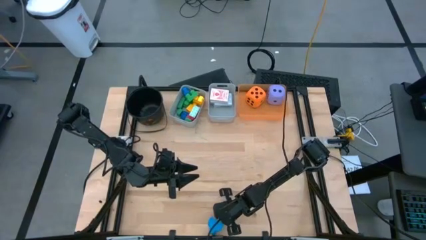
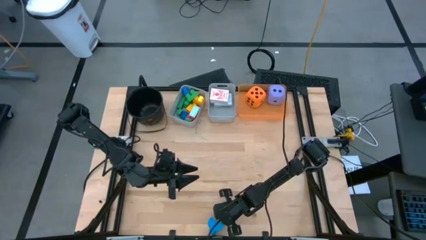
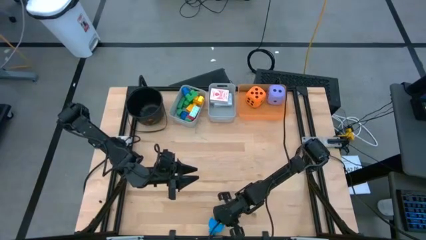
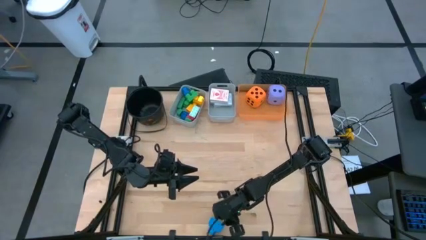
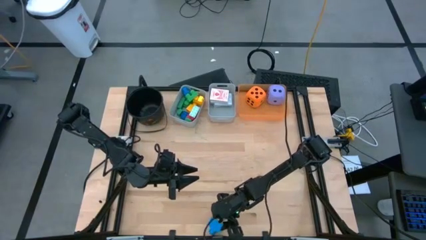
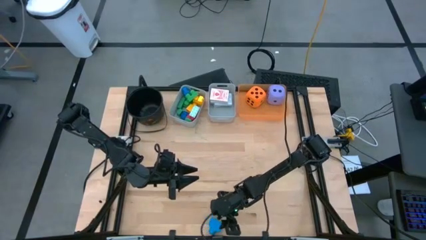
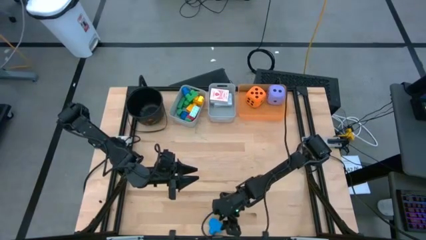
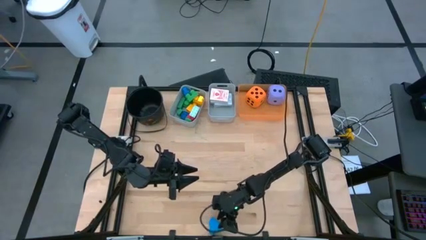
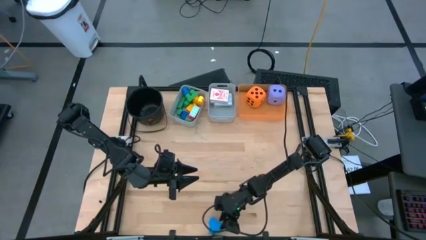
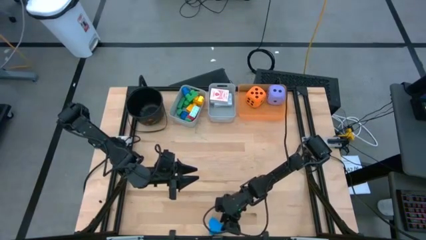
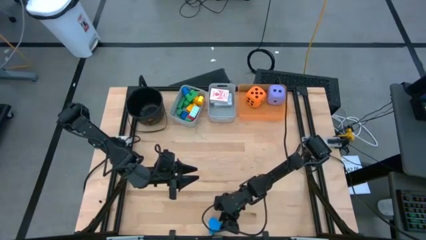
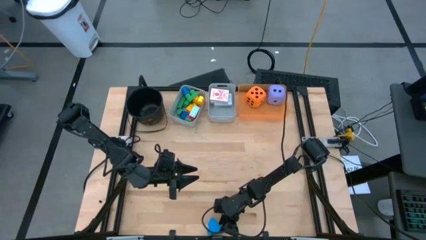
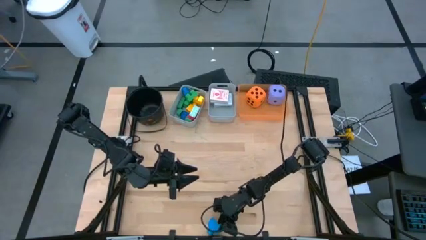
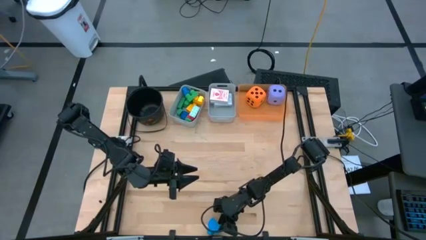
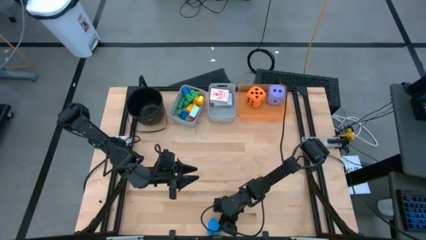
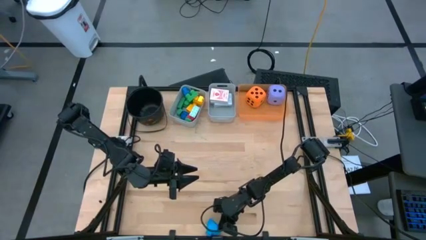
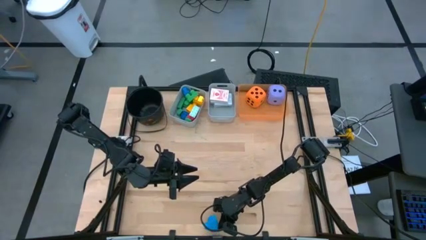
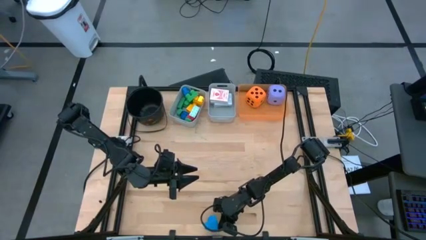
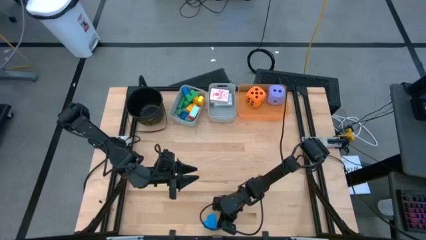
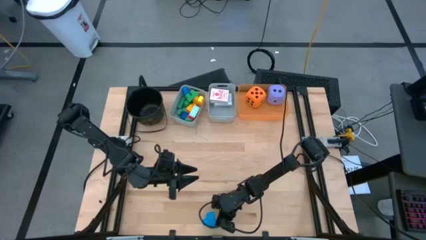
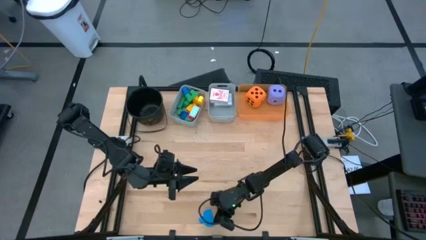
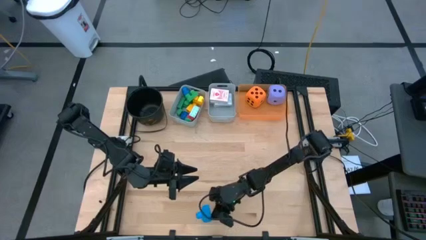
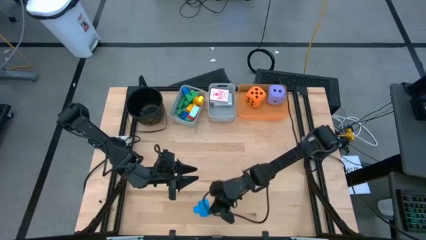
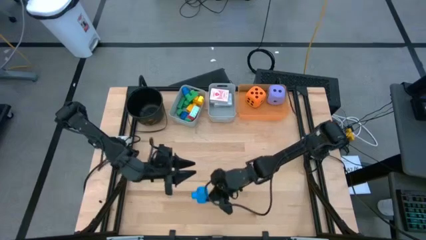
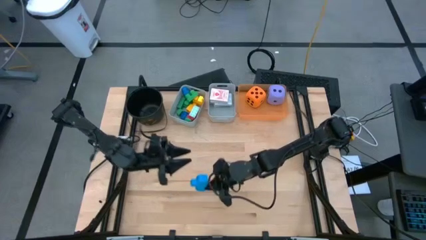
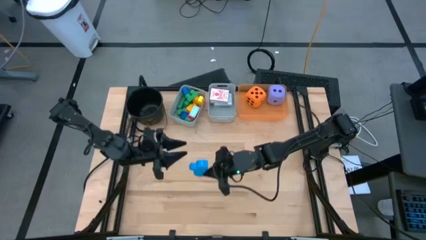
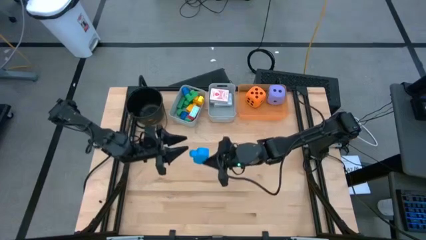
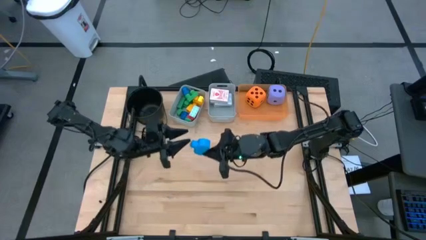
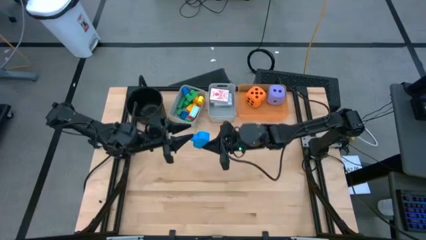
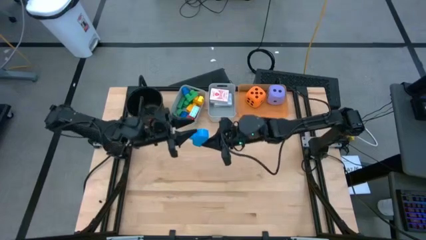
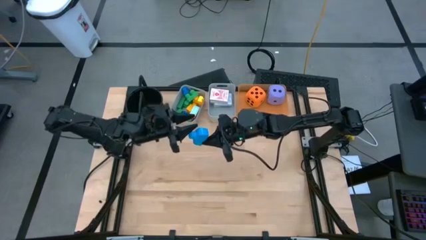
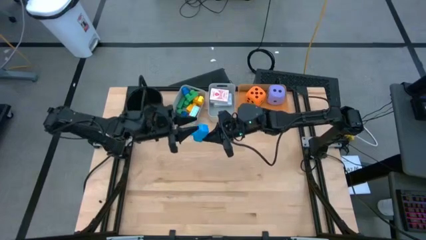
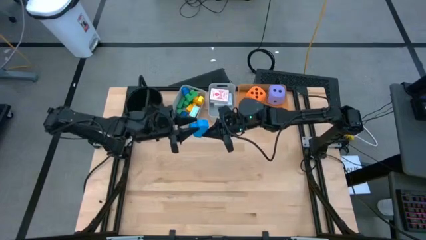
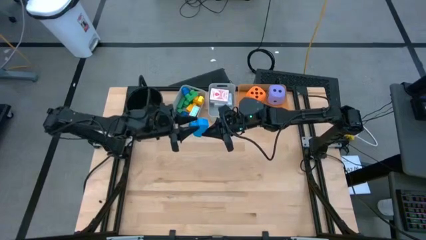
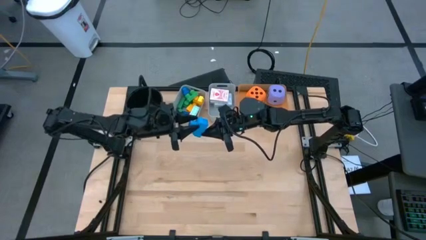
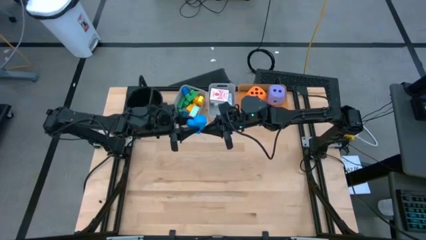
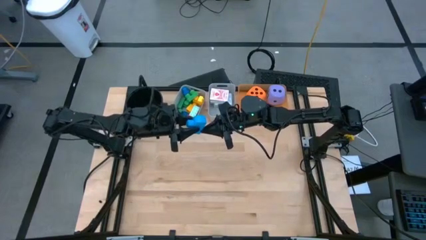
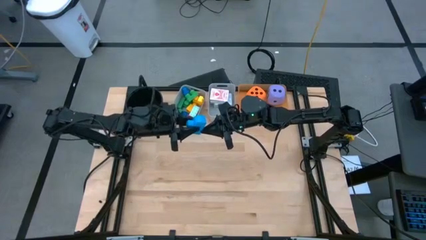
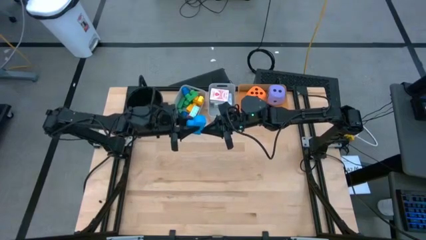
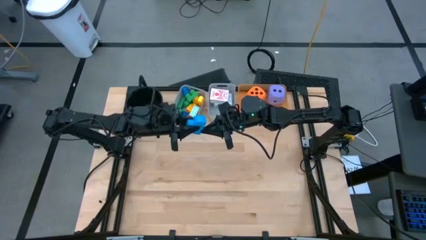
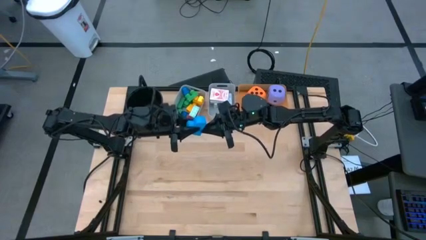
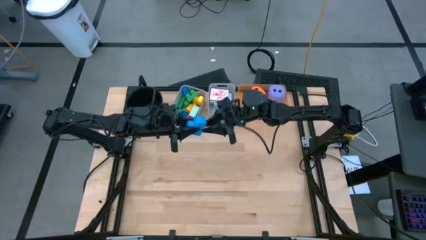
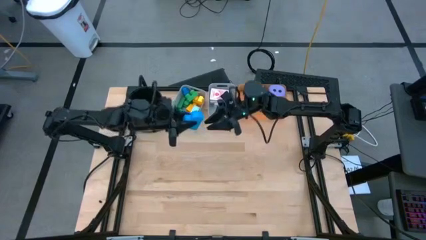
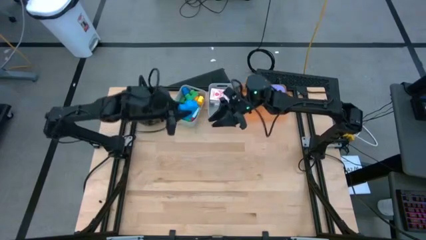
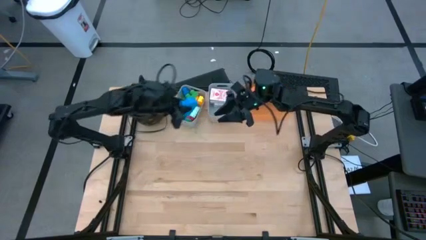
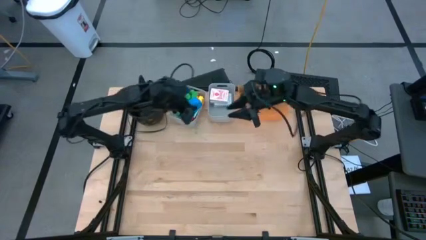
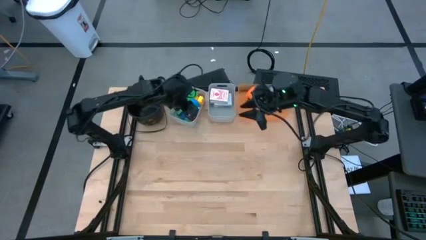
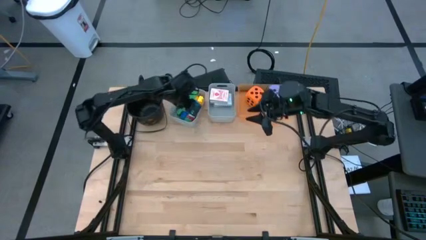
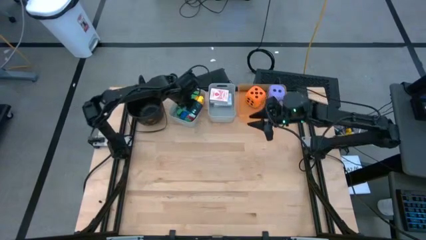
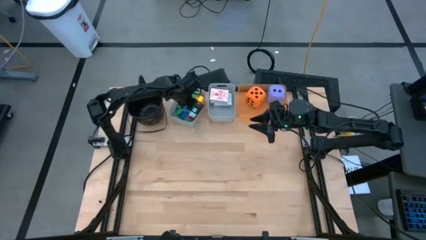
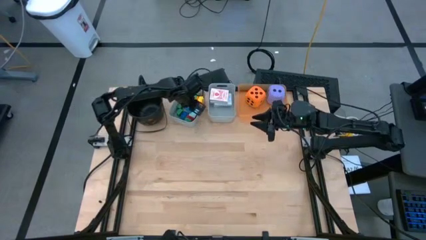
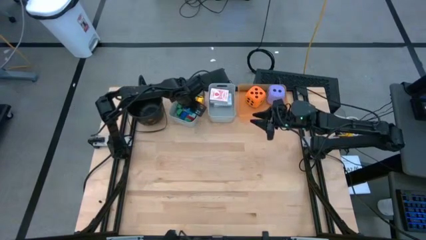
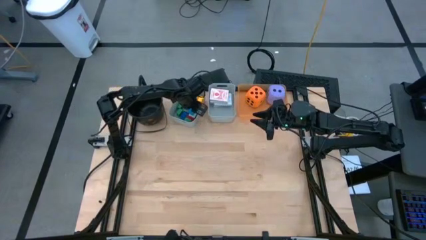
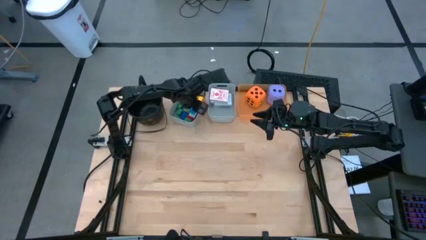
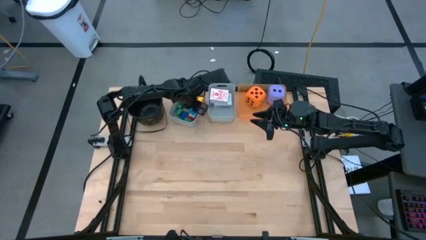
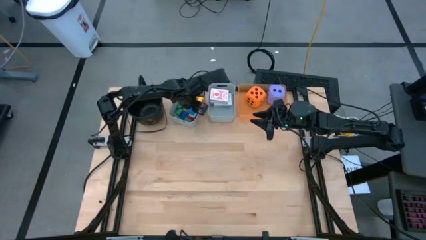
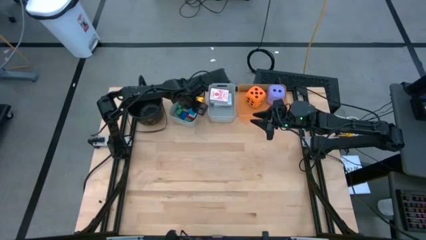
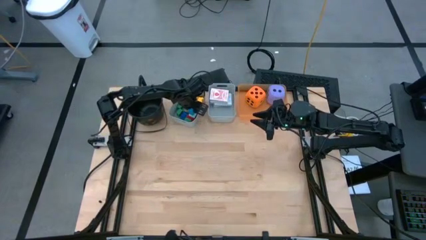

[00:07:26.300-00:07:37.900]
Task: Pick & Place Toys
Put the blue game piece into the left gray bin
